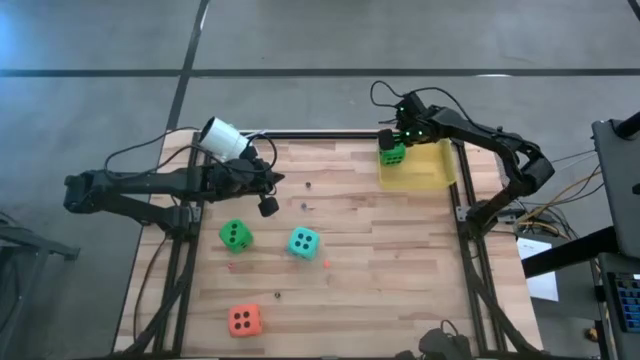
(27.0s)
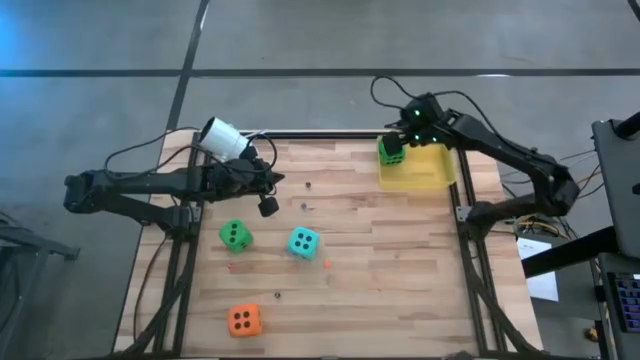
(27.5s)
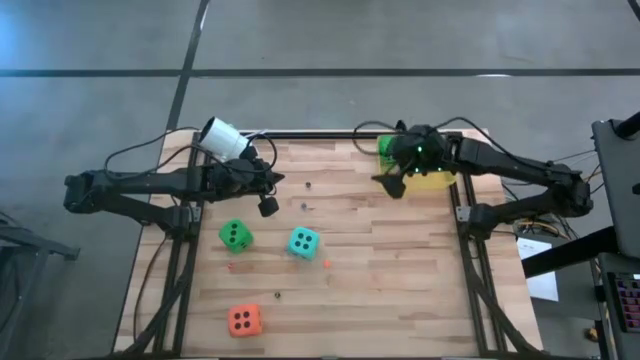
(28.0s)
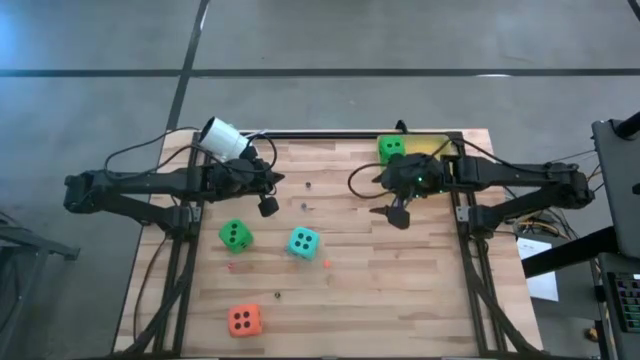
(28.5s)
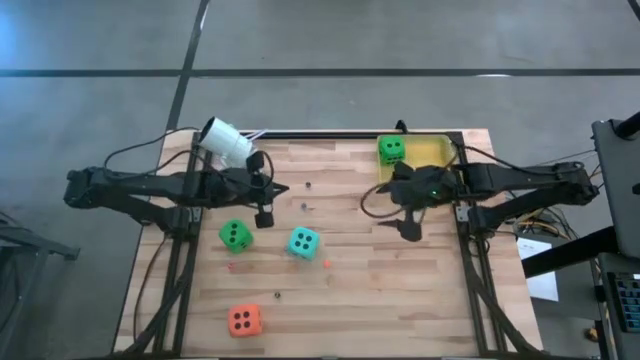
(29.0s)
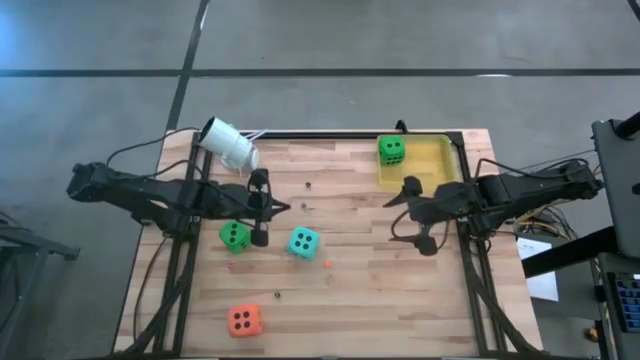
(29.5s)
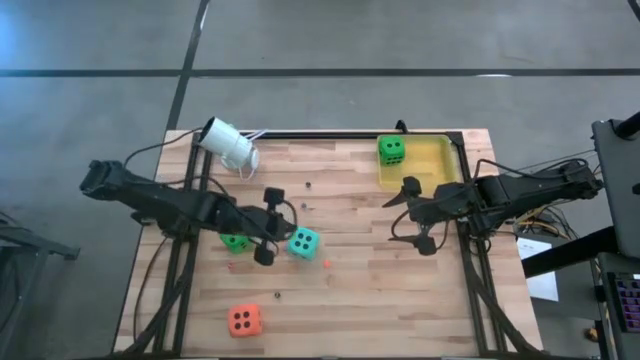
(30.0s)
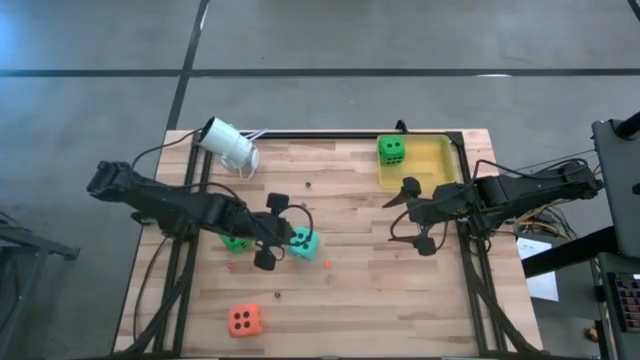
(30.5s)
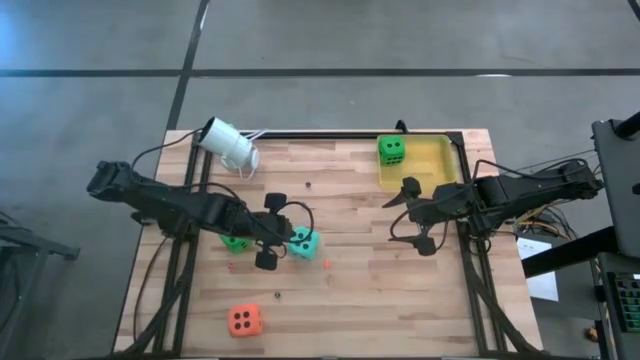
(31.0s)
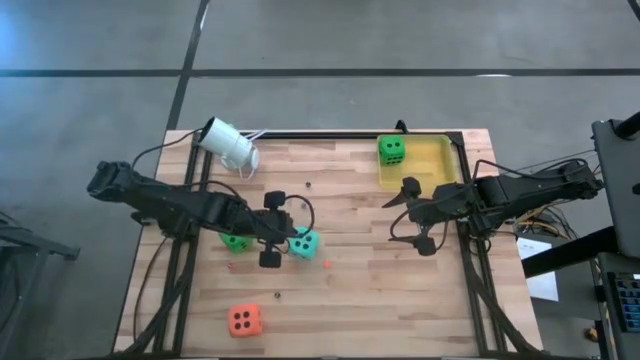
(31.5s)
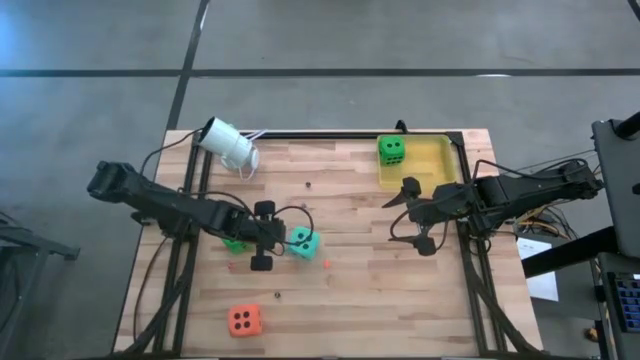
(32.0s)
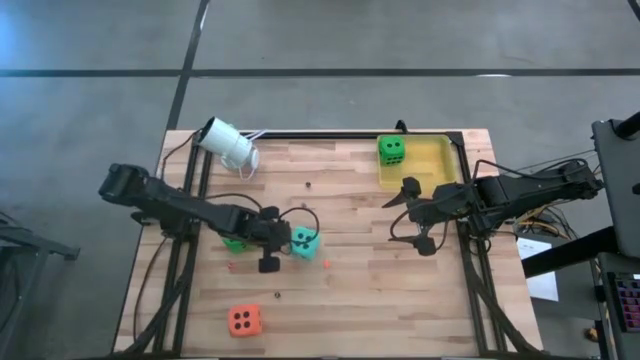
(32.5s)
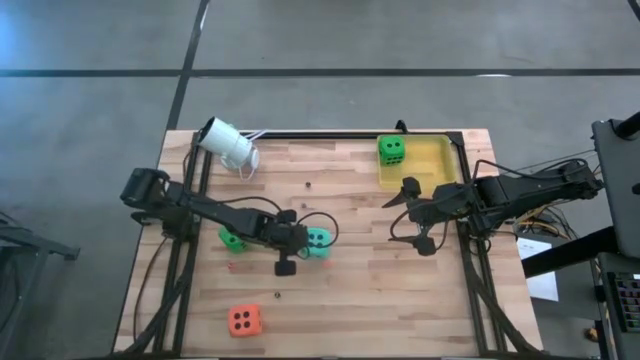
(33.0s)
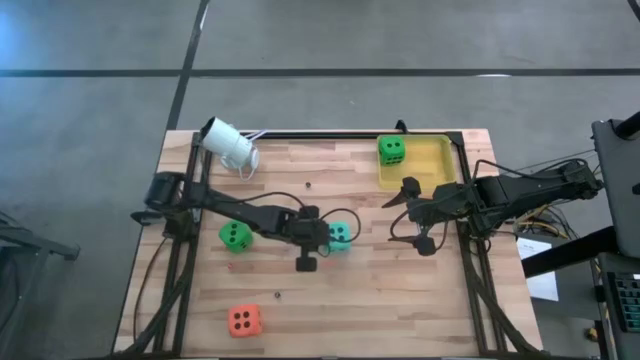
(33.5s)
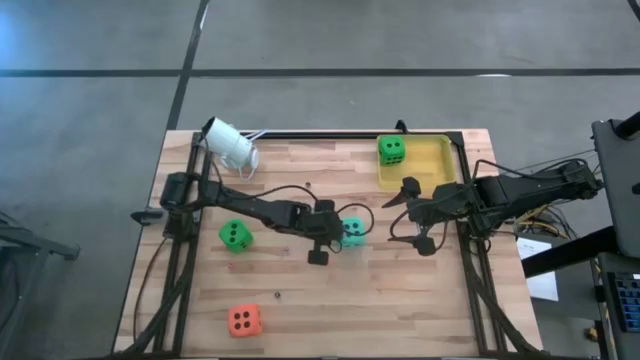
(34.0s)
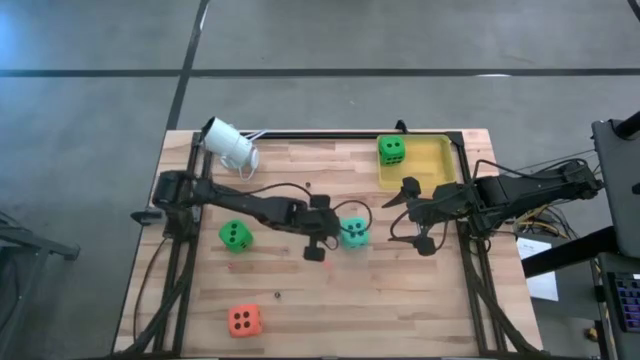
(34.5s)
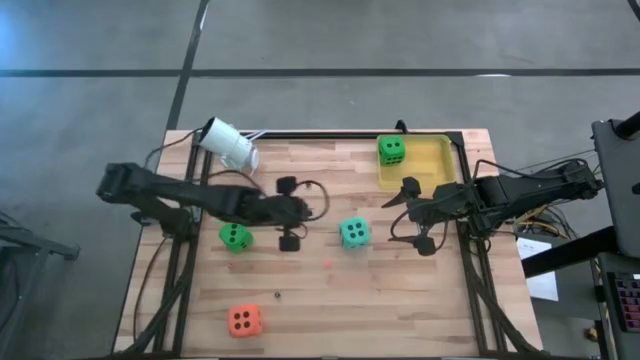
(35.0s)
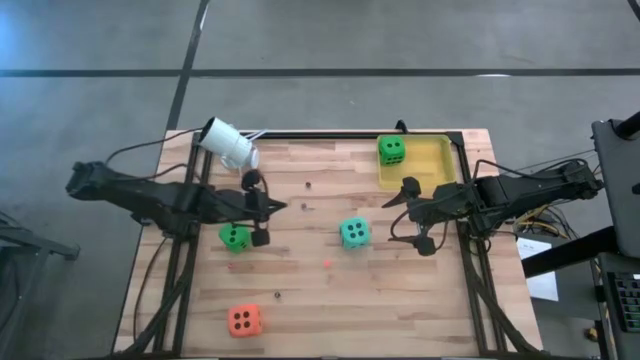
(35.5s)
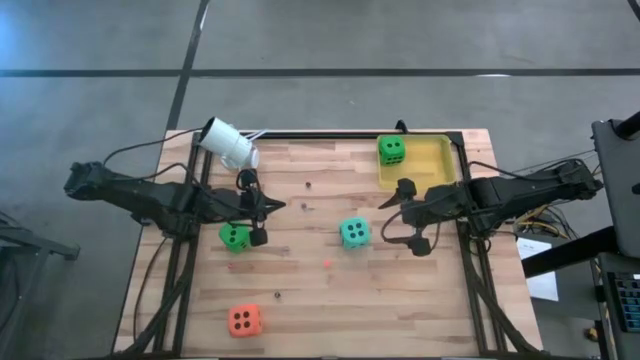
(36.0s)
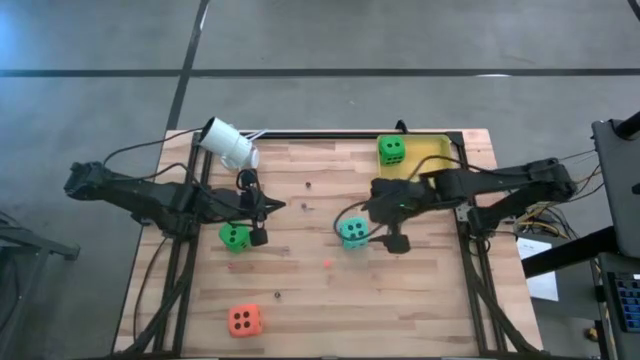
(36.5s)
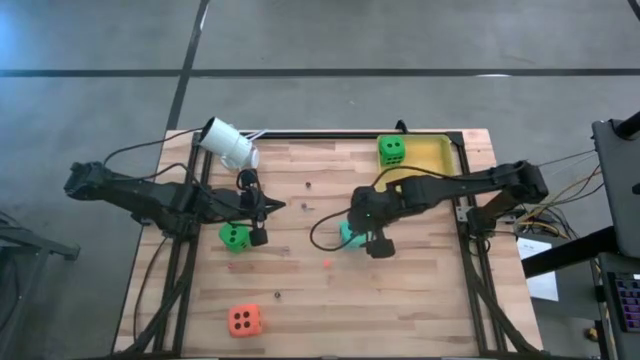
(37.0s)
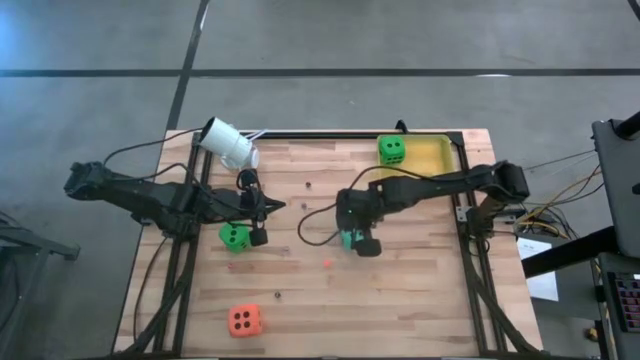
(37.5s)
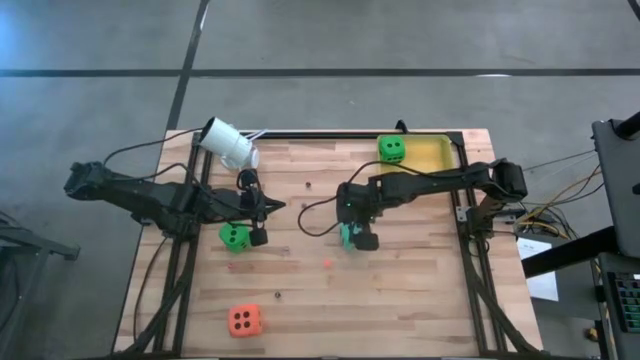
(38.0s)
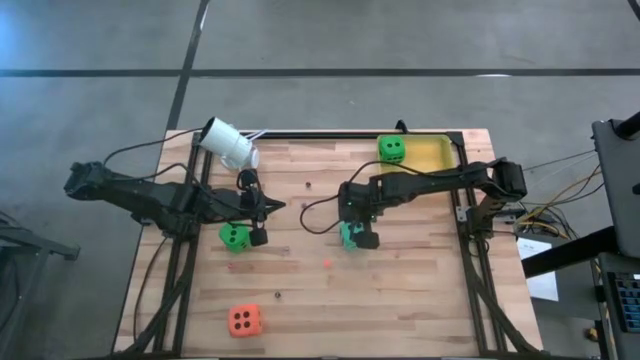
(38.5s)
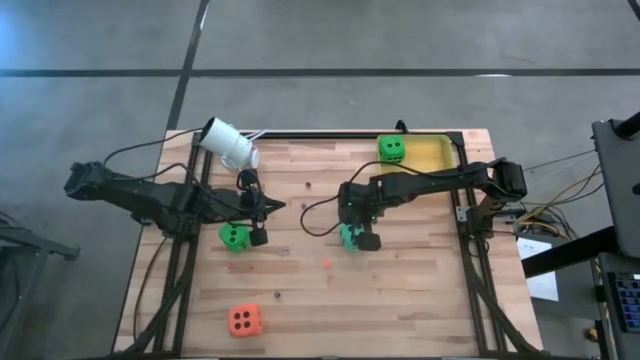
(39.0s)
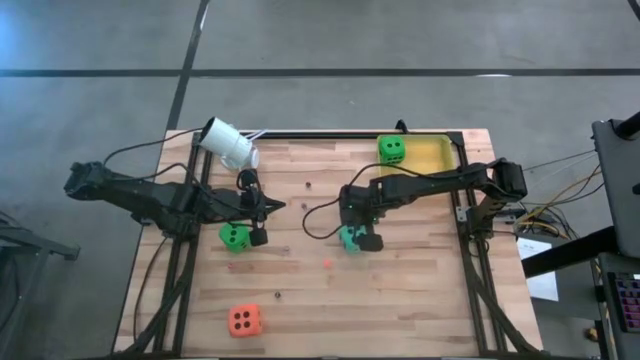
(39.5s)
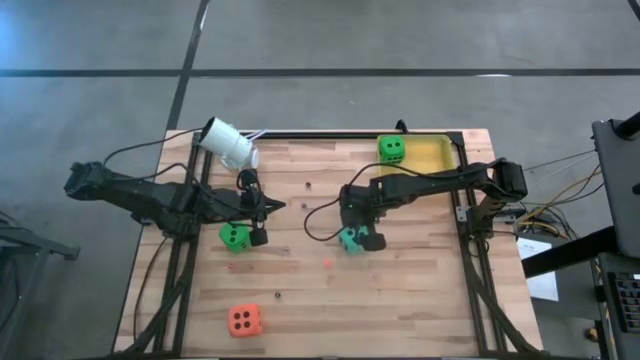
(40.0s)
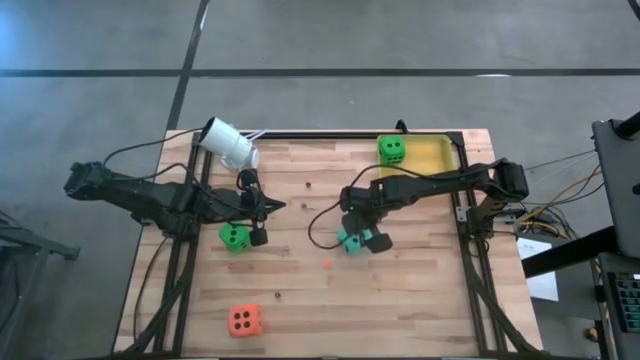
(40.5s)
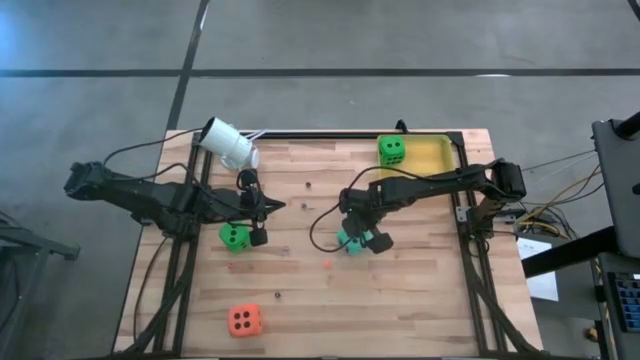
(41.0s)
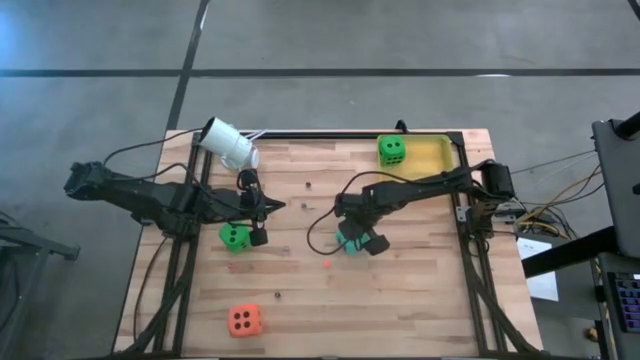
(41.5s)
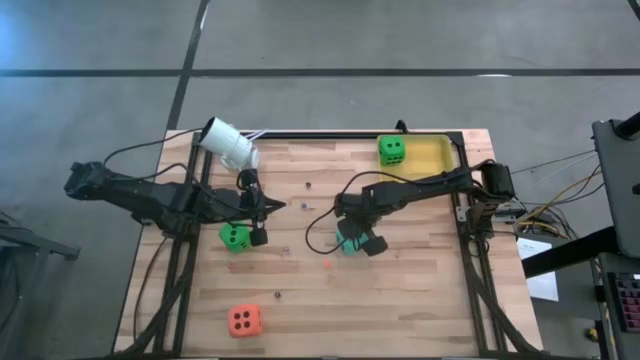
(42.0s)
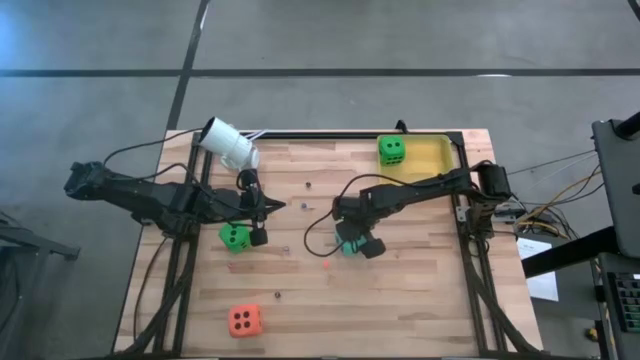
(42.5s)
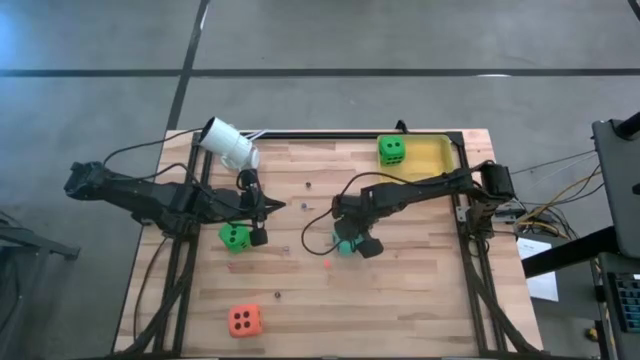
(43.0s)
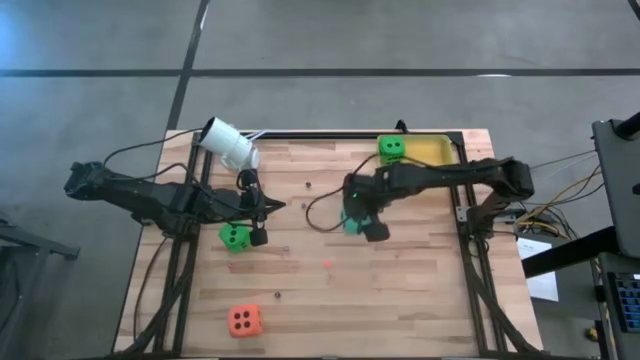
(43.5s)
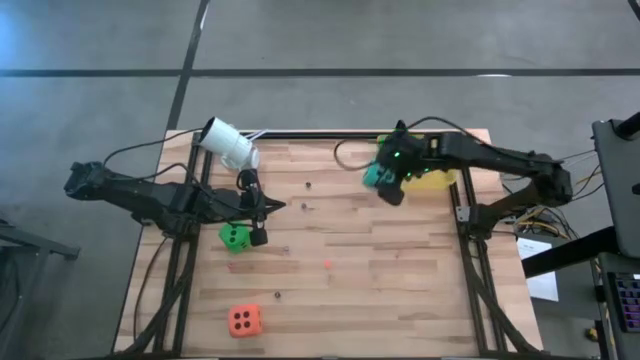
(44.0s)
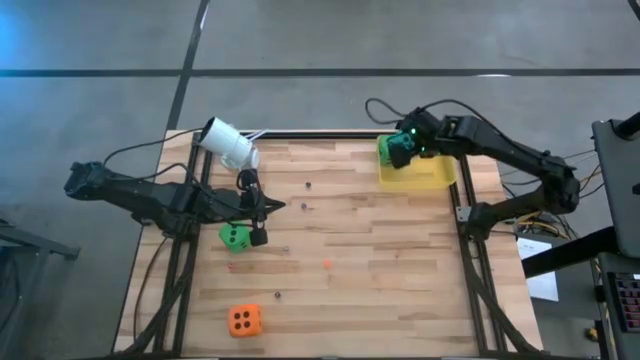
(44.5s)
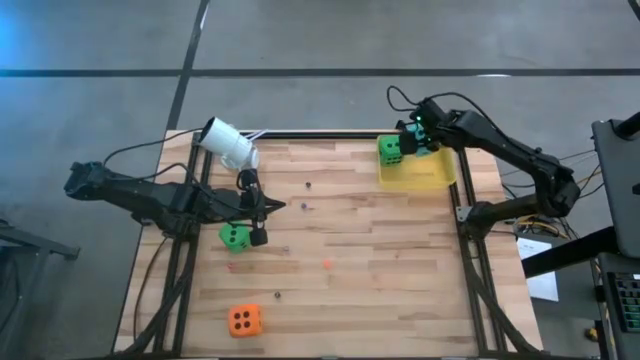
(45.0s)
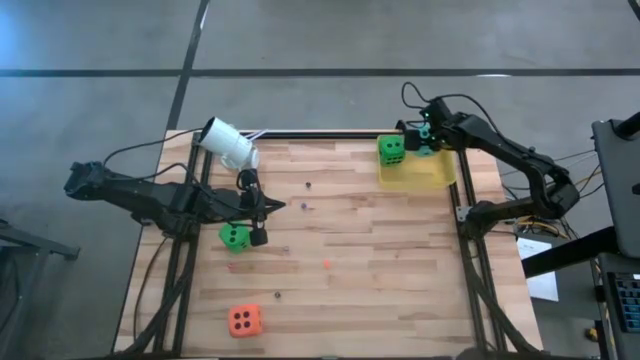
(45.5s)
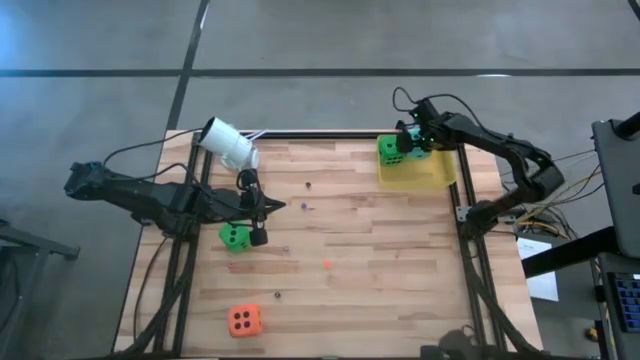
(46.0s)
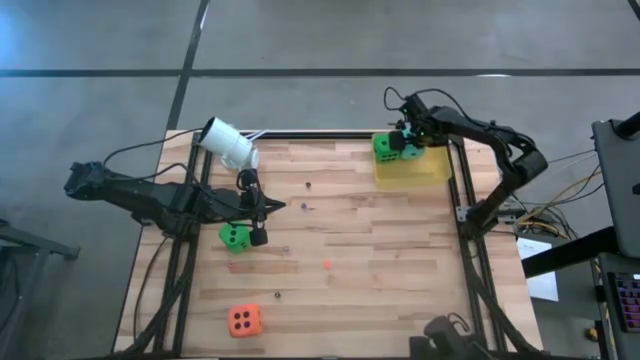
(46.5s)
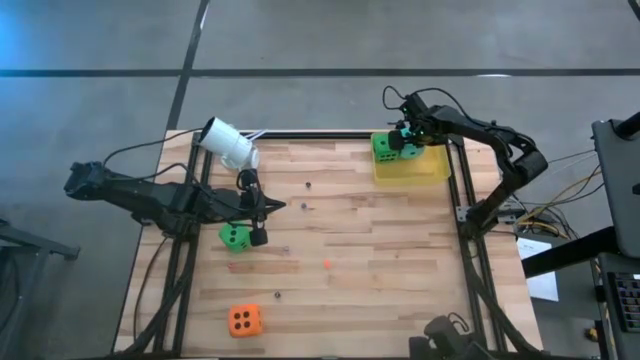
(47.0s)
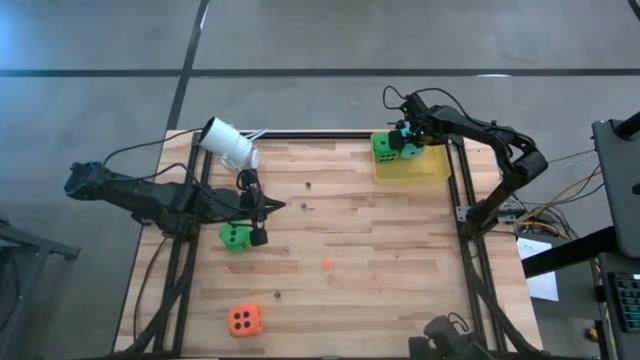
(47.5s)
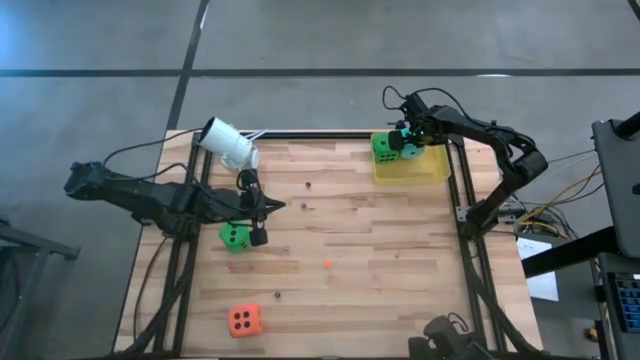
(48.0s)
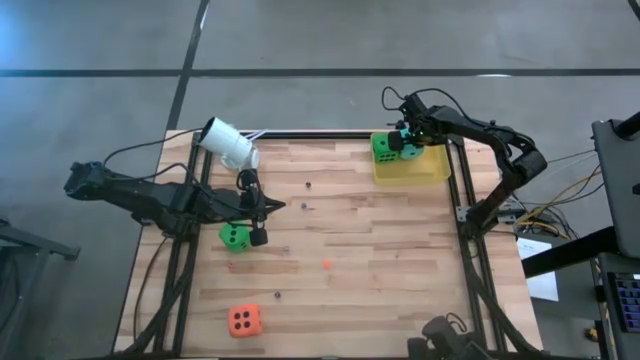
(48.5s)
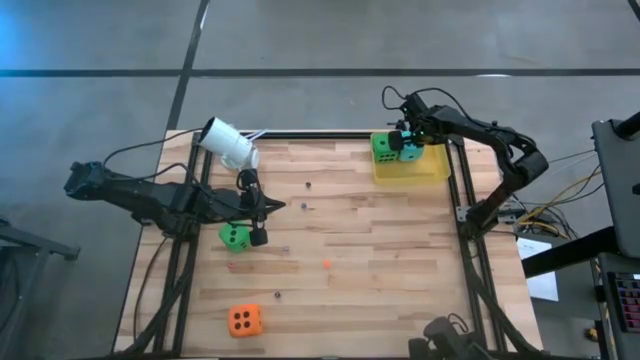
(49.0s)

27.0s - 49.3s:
Task: Pick & Place Dice
Put the large light blue dice into the yellow transparent bin
